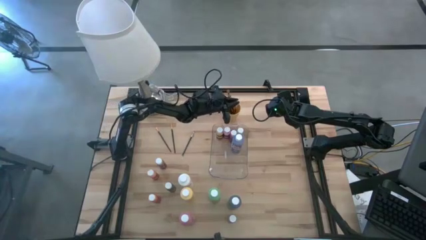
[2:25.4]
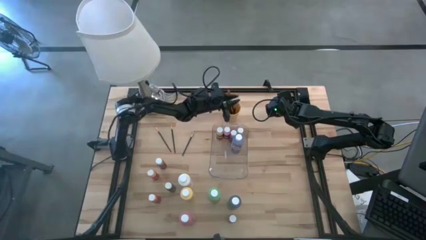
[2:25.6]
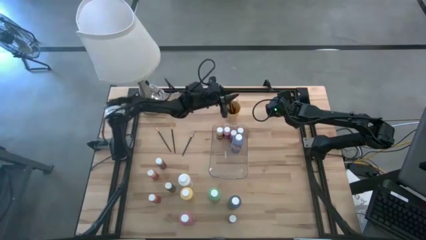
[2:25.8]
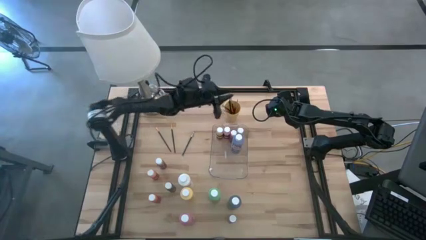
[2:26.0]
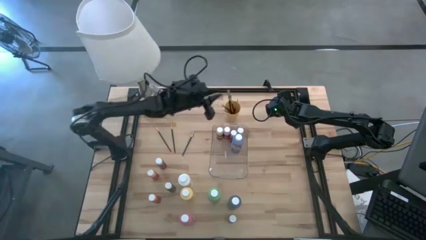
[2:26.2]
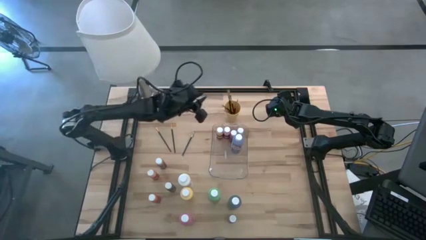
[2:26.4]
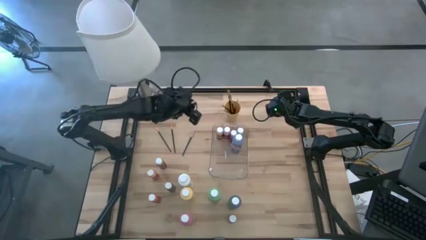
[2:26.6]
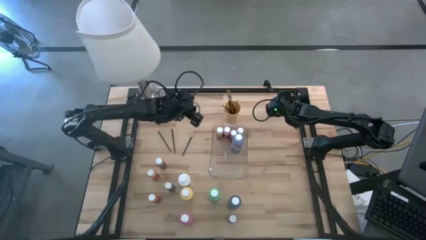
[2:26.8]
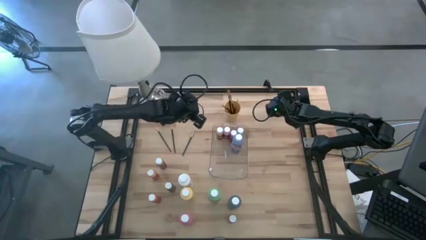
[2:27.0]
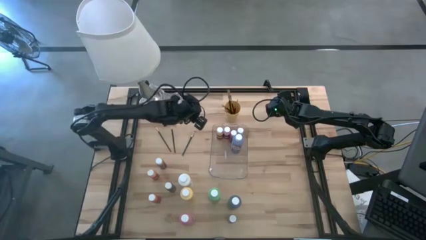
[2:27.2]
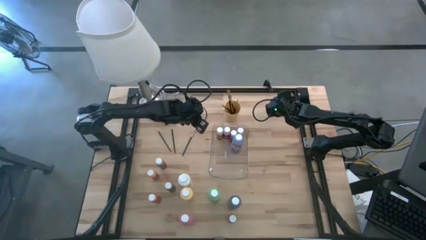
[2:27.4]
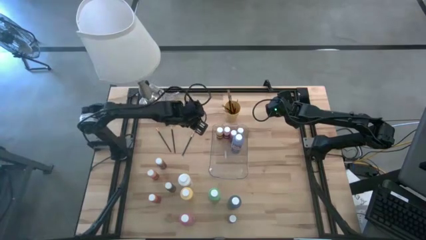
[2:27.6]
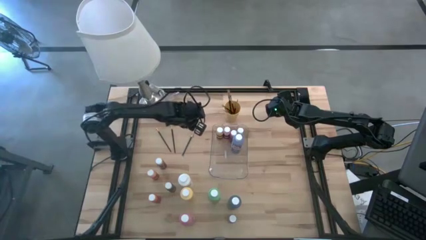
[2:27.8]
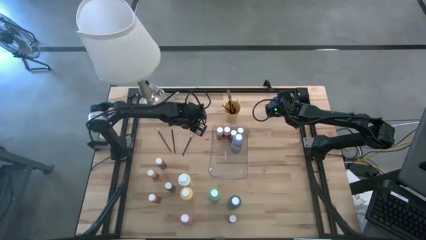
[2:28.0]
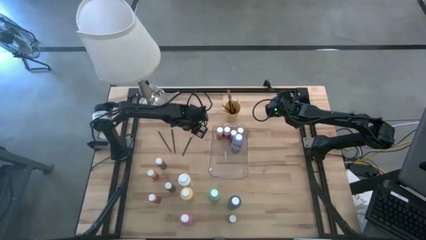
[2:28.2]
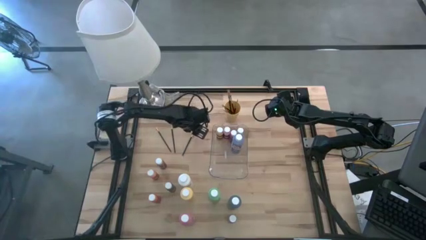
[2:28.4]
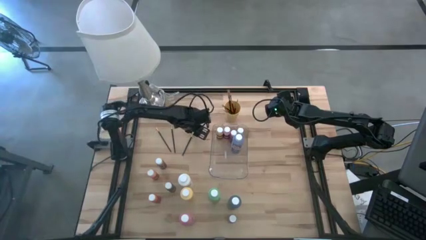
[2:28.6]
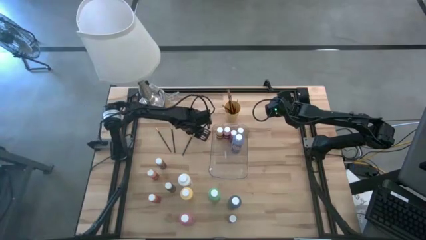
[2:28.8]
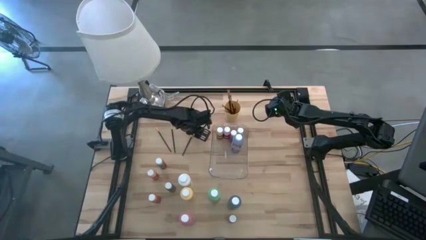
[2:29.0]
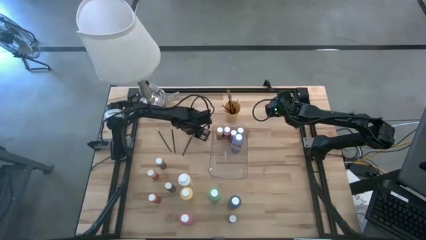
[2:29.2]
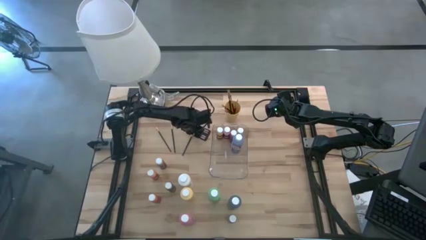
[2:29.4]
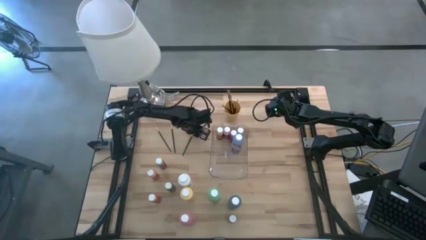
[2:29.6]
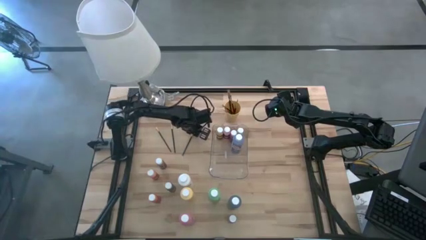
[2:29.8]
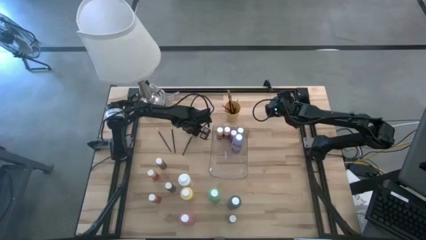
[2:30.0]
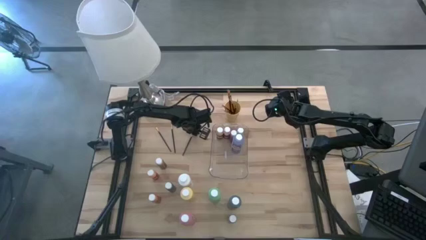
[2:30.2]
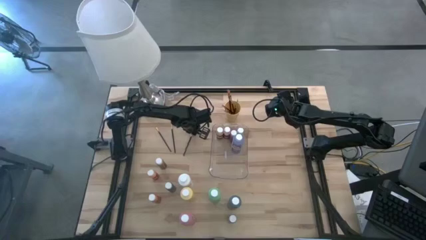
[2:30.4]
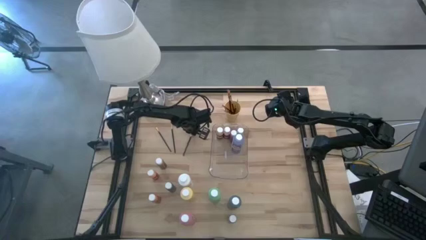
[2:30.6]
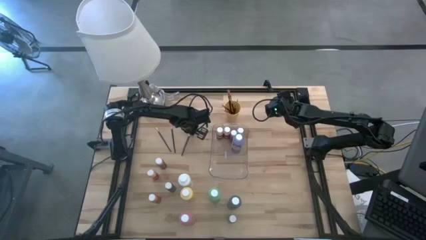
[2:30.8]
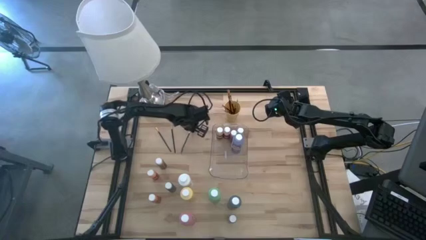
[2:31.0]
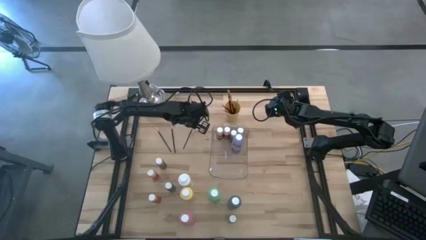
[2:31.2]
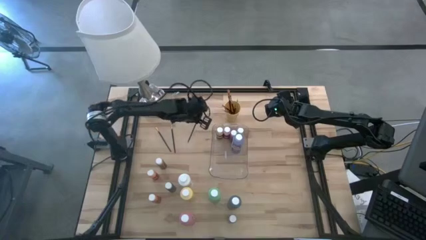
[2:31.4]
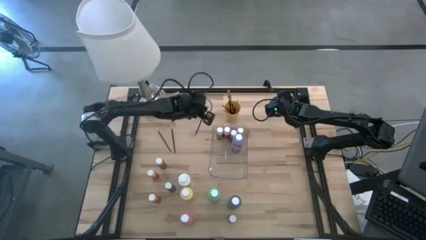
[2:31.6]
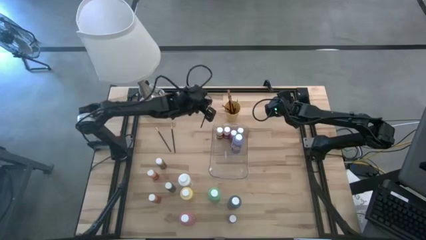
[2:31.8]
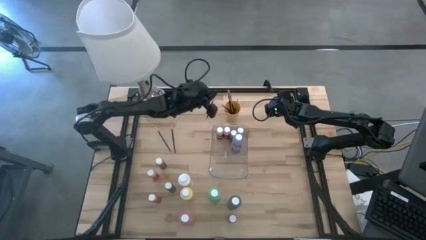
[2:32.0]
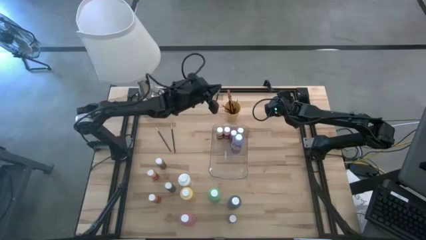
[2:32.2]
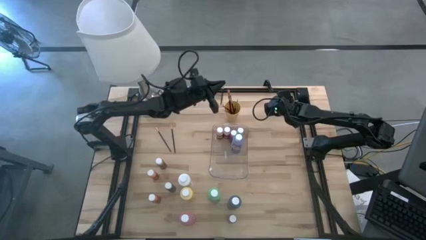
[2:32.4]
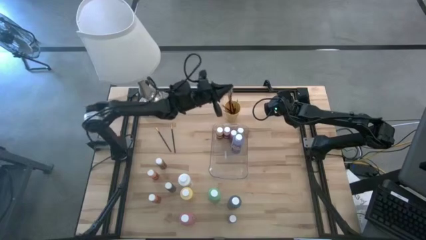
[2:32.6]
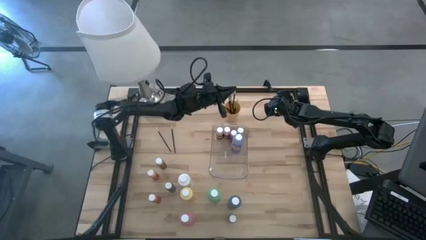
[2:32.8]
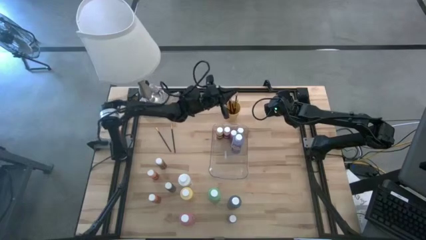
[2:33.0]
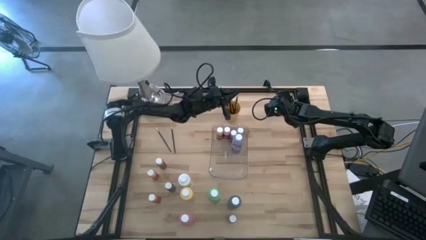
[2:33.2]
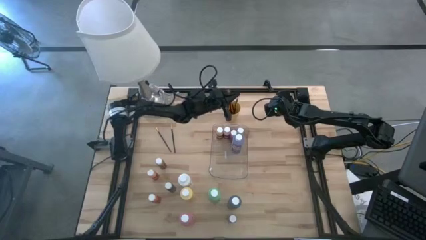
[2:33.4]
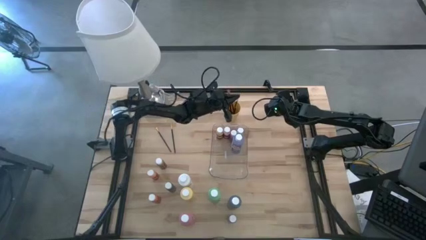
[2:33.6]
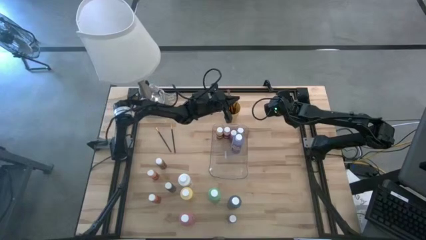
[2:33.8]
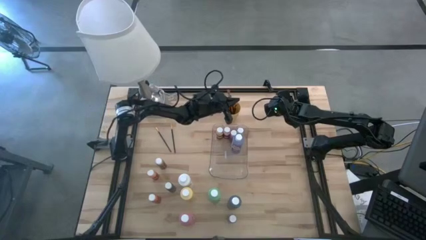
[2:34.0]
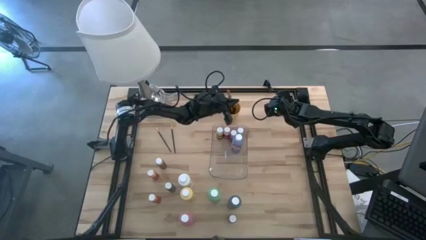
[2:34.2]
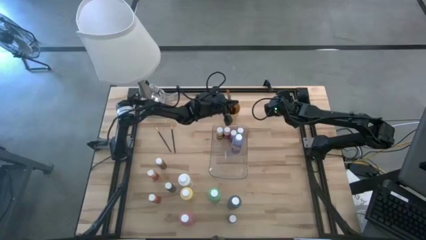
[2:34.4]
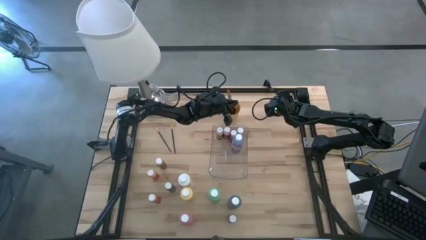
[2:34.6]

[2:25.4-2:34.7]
Task: Pick & Place Paint Supplies
Put the silver paint brush into the yellow cup

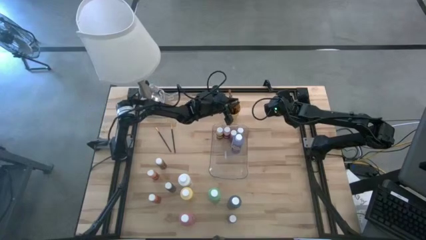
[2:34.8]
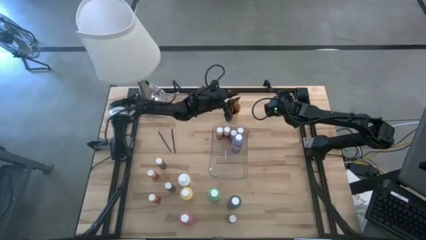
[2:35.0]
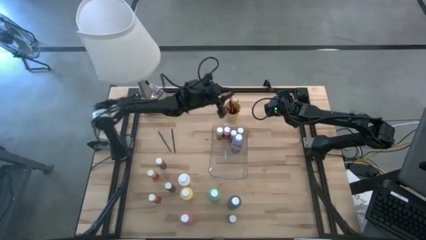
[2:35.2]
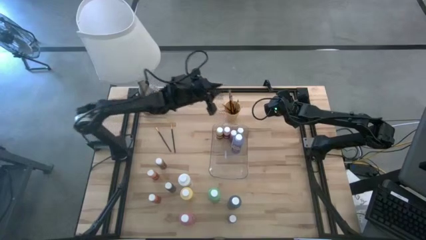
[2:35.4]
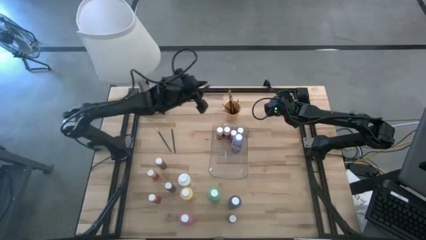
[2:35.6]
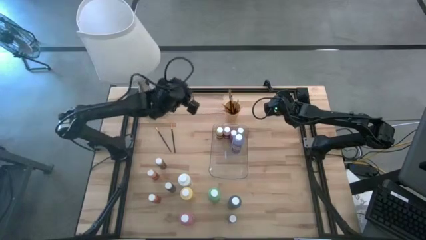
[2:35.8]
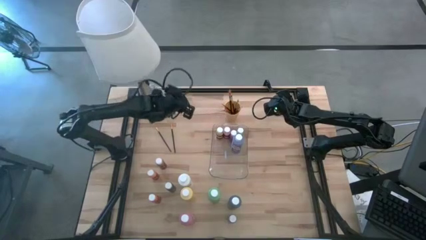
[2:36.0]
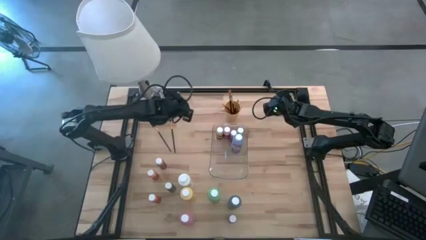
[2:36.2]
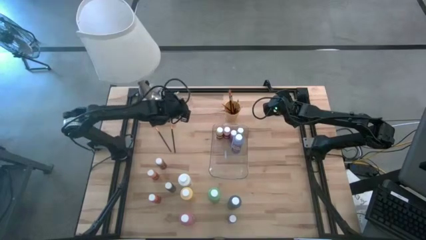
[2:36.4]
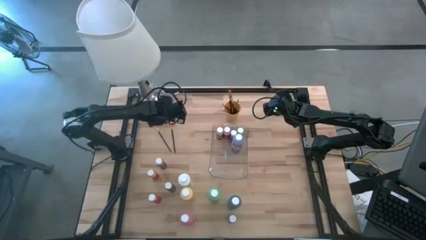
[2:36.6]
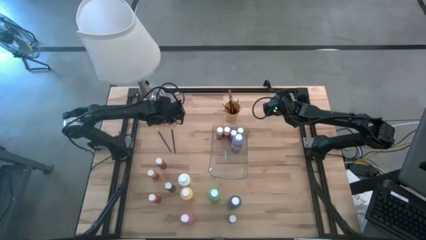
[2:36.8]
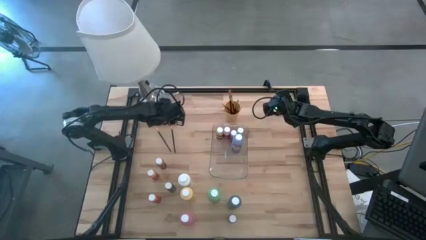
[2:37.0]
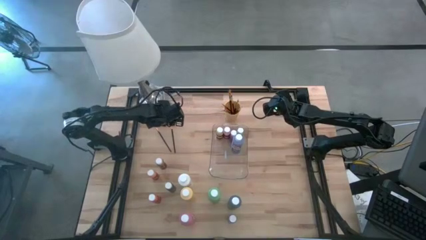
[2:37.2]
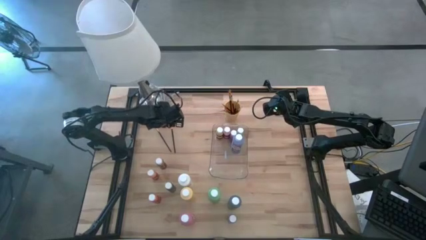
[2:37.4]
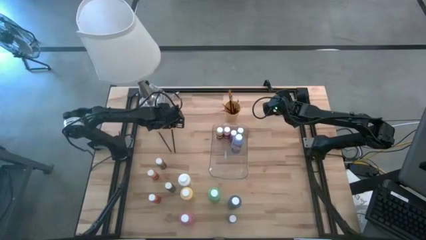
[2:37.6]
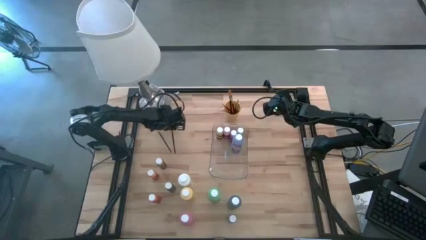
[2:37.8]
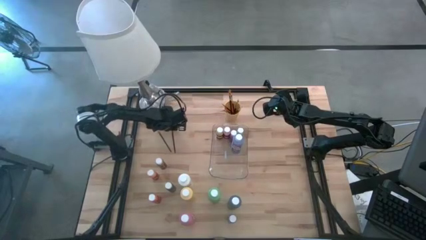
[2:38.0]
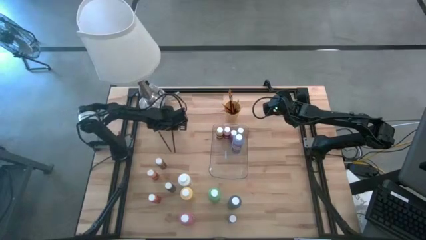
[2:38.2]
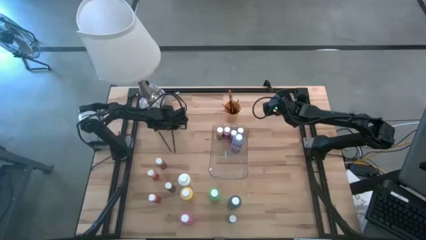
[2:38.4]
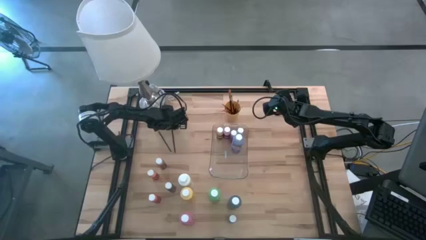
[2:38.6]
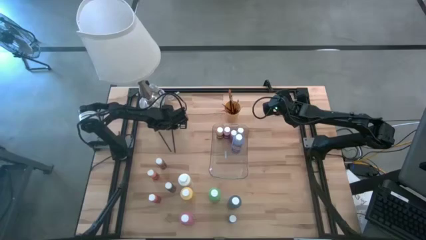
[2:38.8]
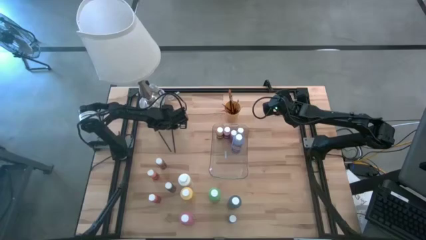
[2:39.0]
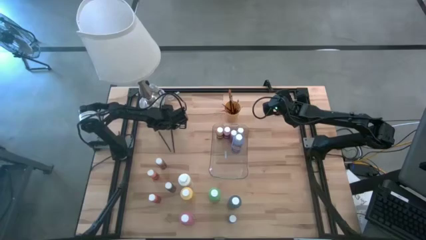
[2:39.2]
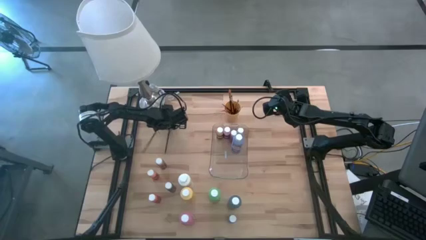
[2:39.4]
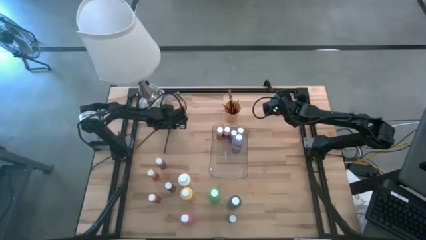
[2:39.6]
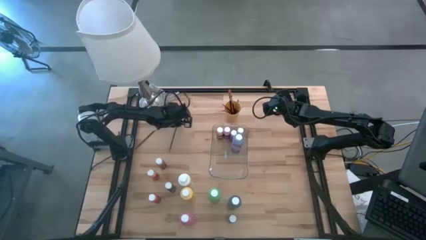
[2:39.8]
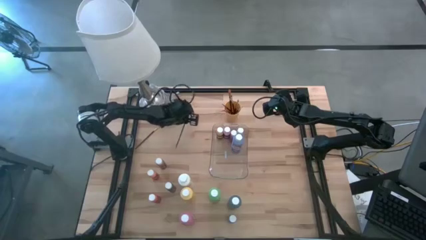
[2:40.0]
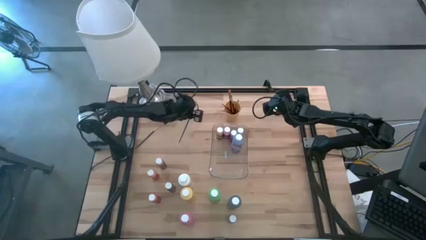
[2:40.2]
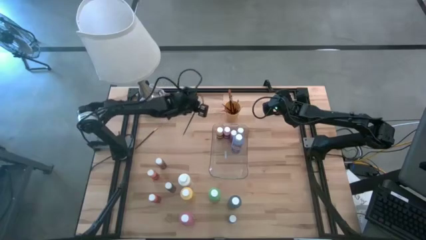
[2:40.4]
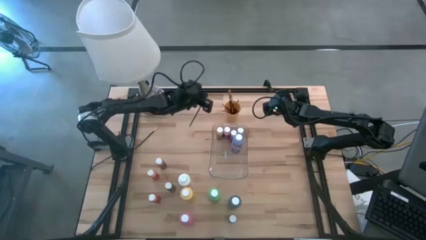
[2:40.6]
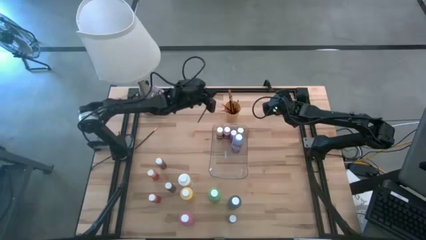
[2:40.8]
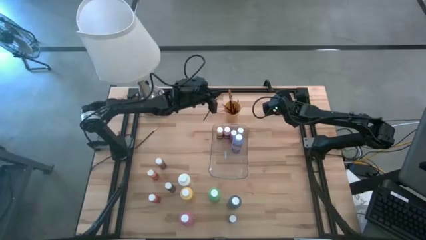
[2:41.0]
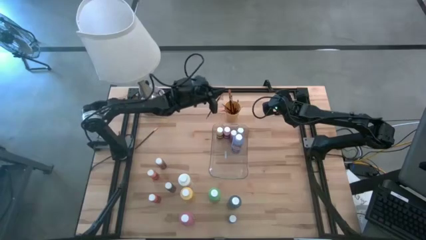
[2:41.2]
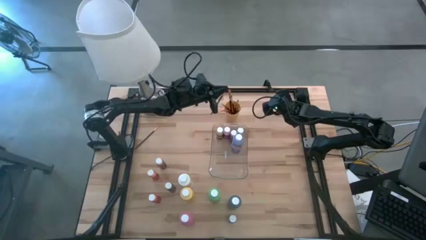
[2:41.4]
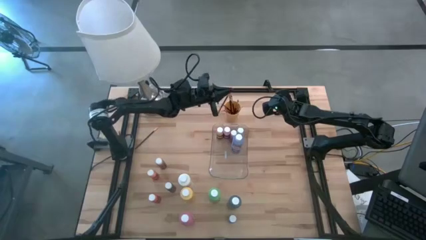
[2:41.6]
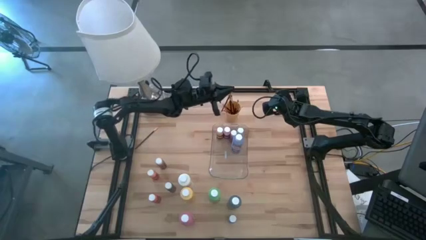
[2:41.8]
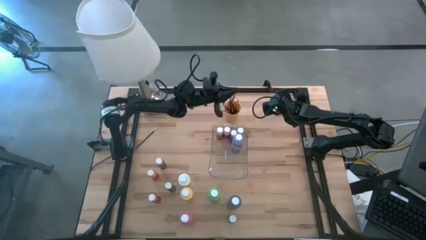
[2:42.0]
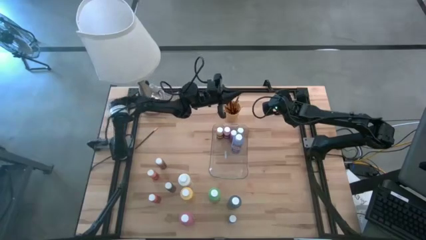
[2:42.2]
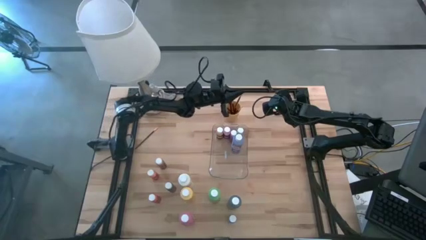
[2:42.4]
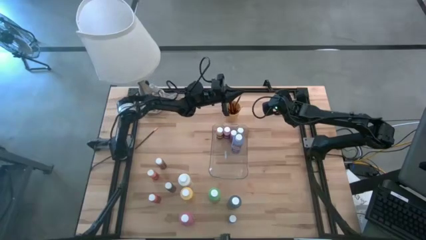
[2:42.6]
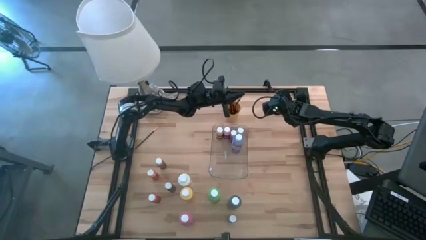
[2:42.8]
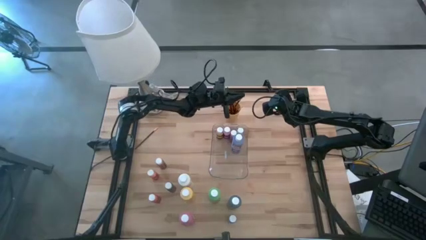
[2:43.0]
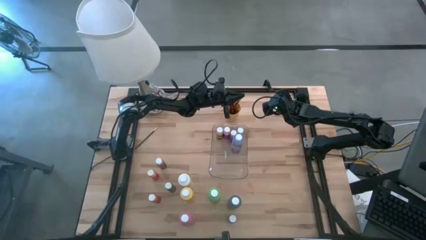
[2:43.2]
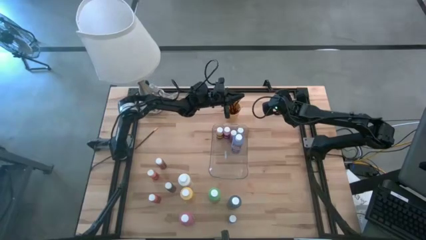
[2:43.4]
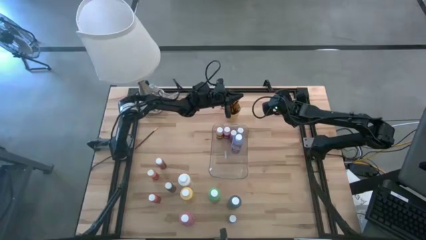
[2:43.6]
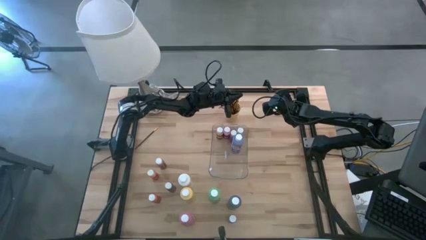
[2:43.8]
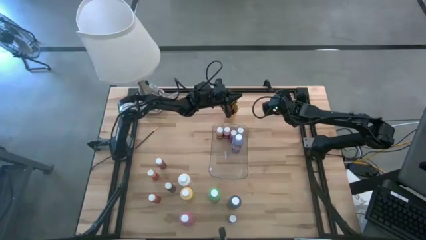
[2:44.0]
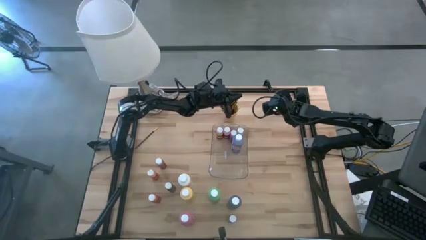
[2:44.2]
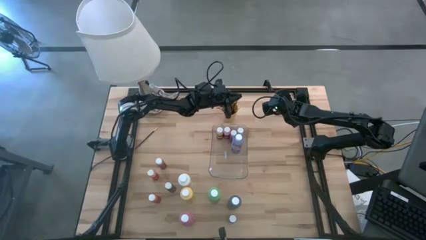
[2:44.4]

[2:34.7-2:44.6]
Put the gold paint brush into the yellow cup
